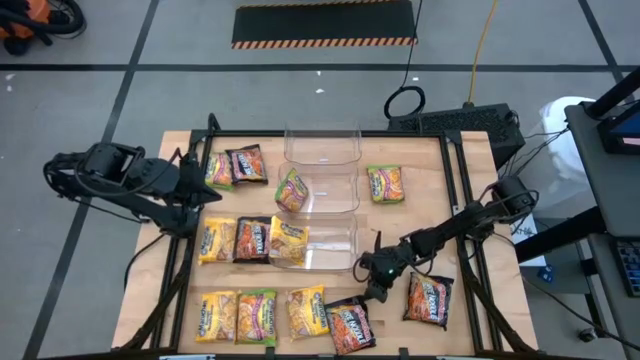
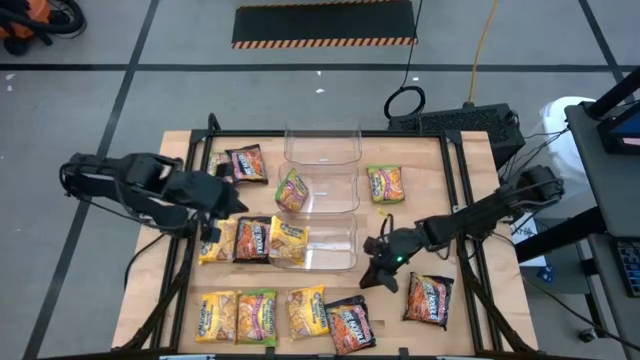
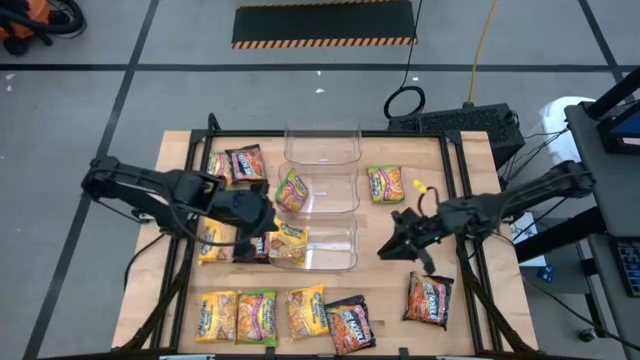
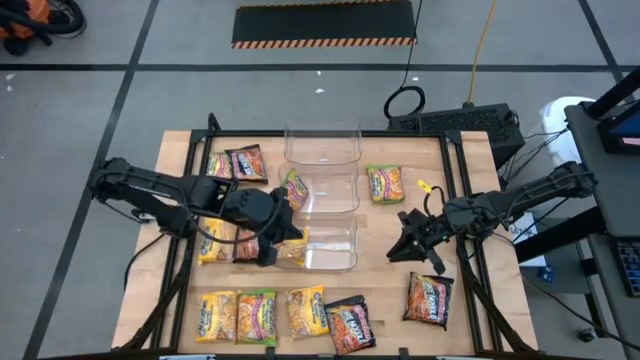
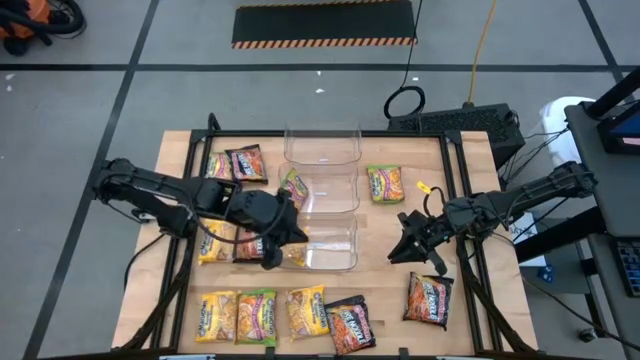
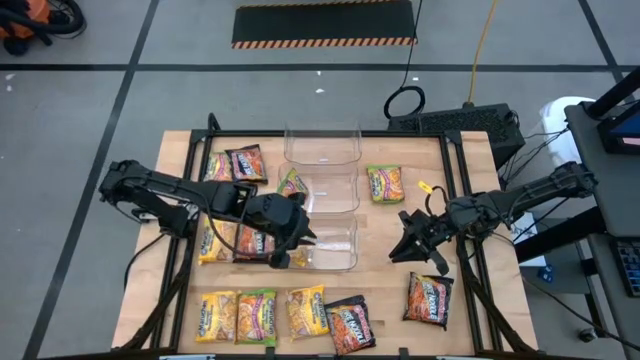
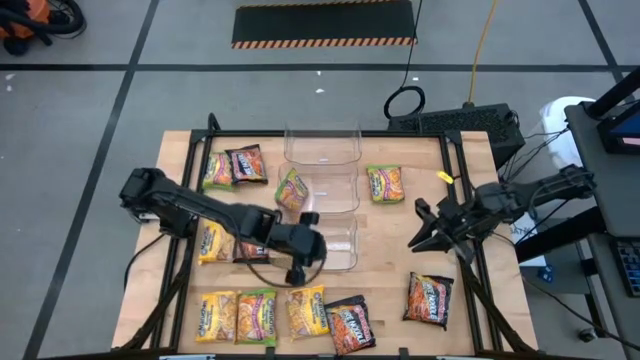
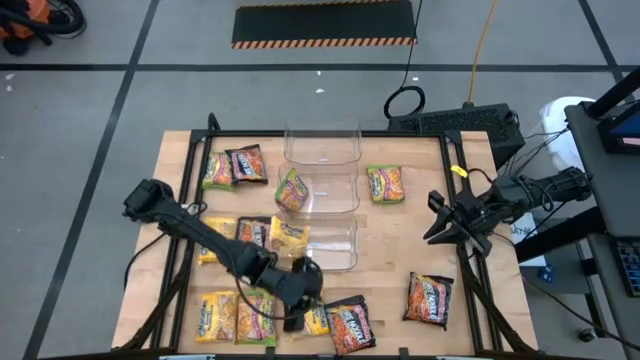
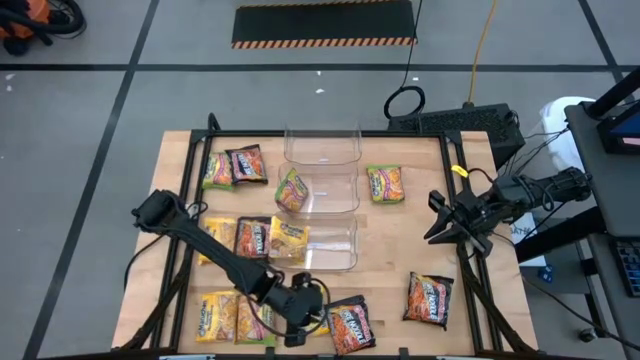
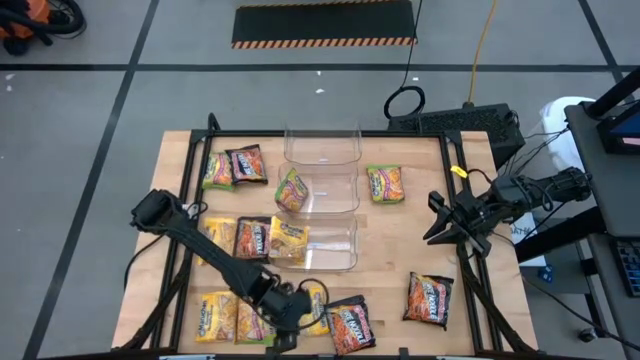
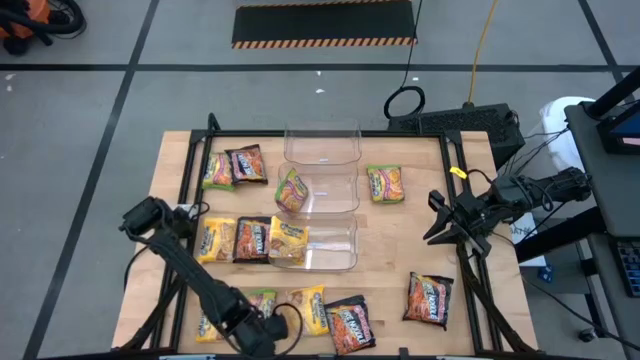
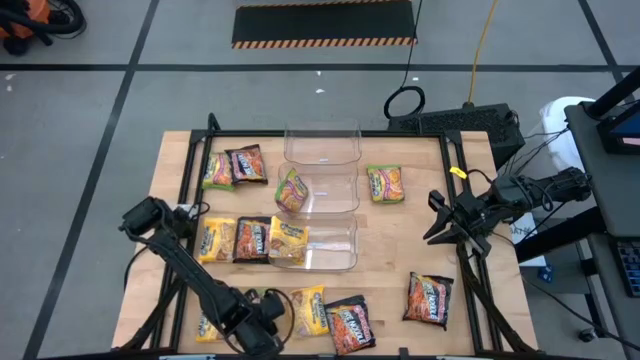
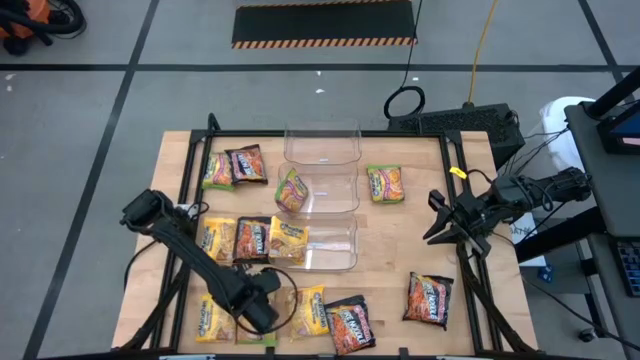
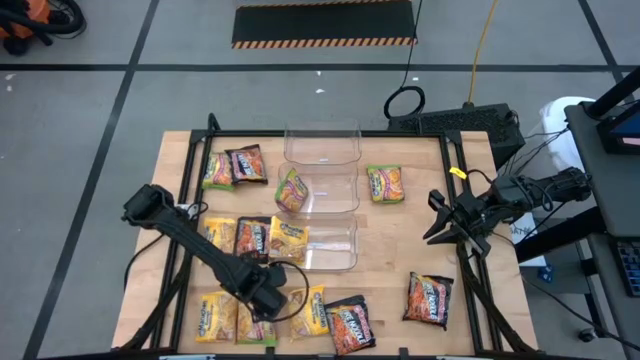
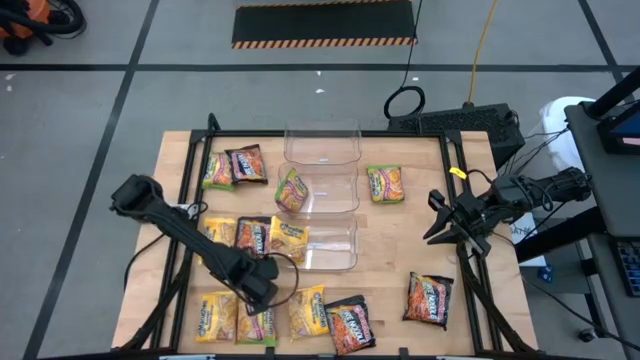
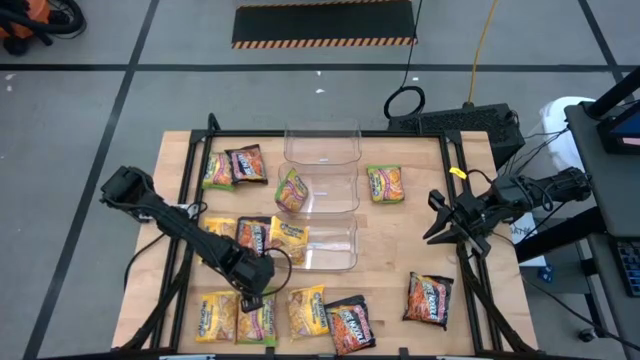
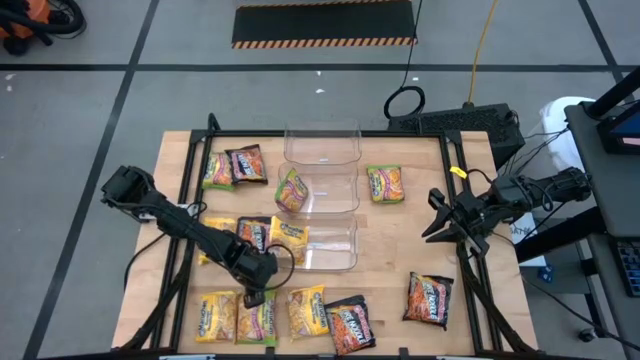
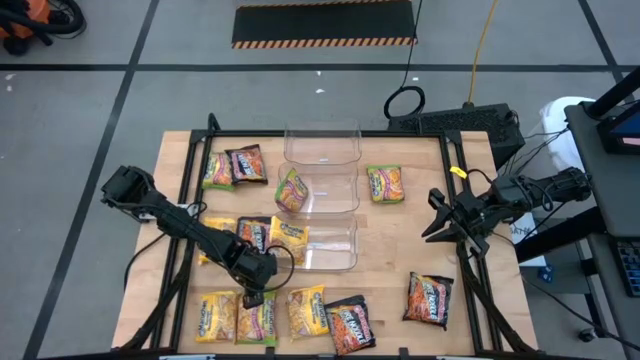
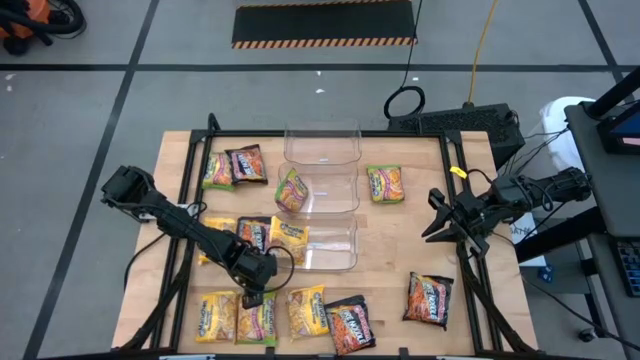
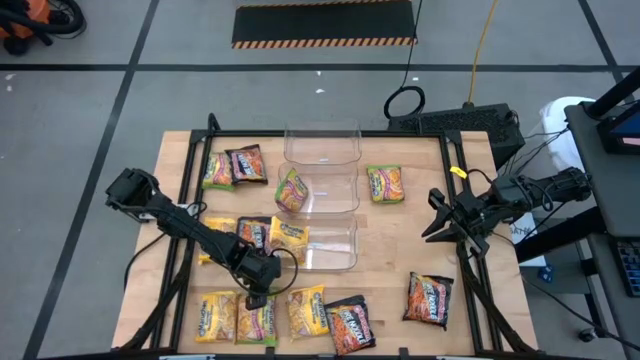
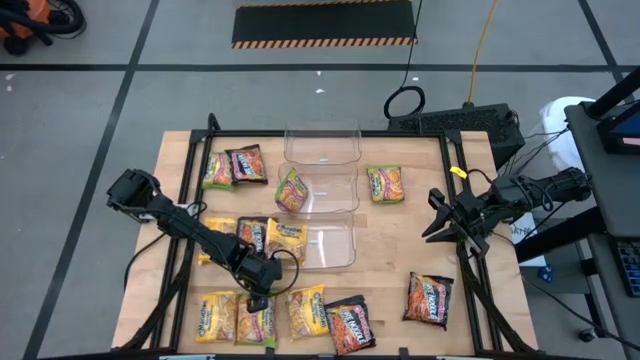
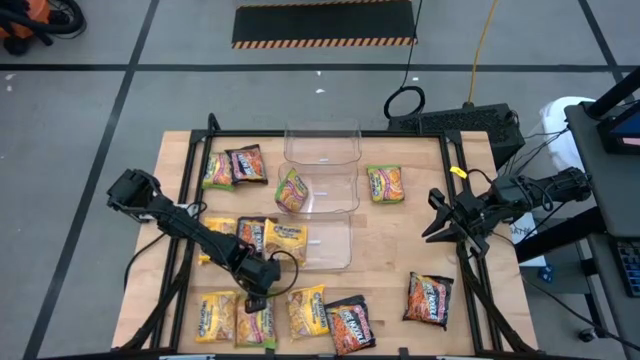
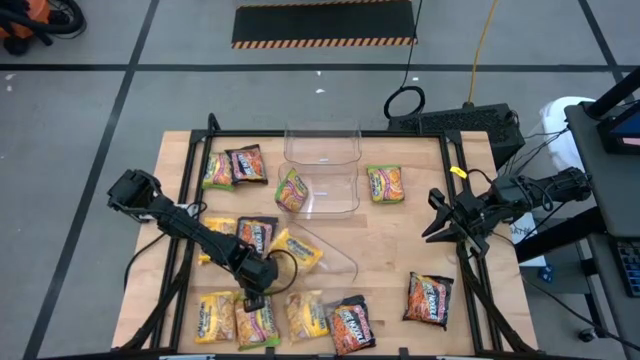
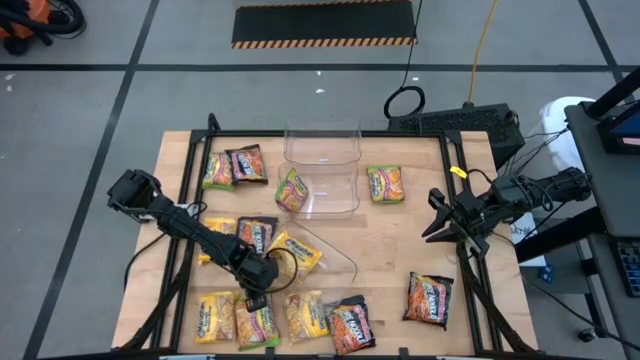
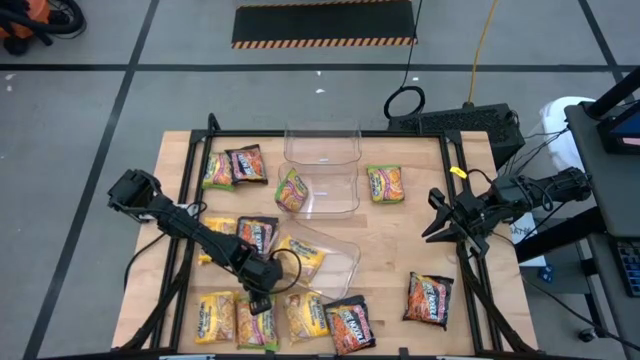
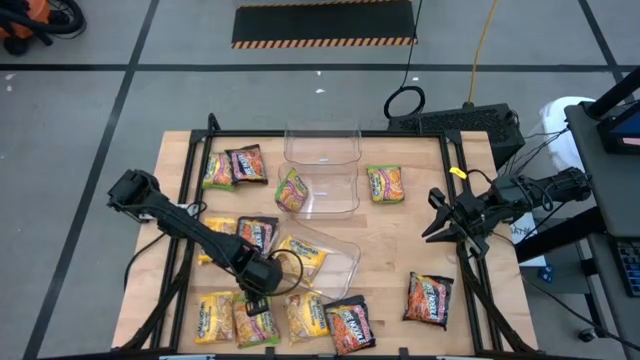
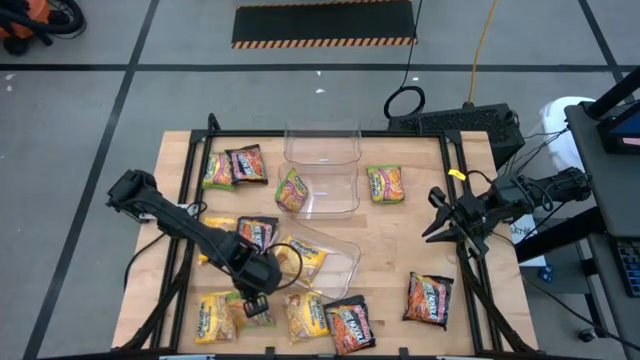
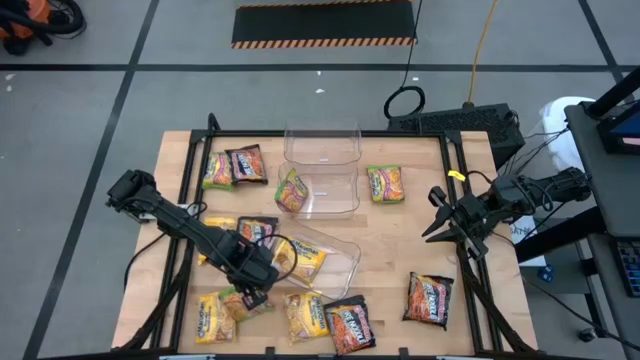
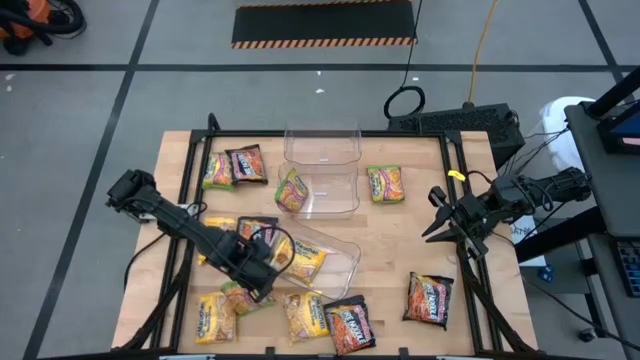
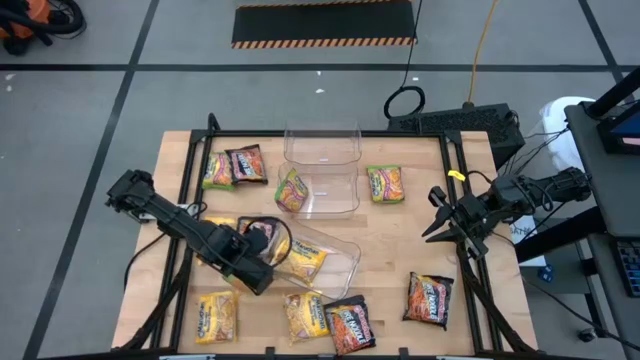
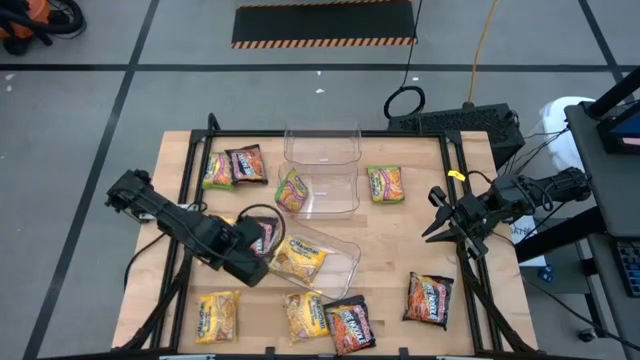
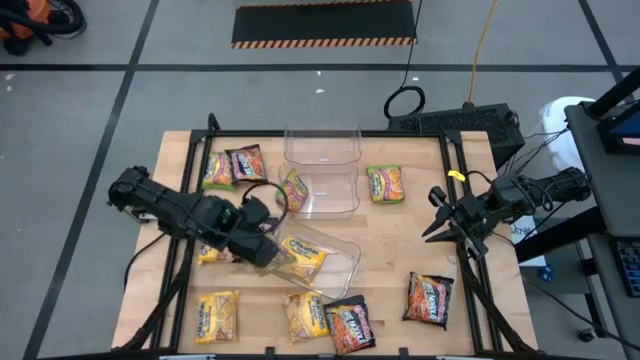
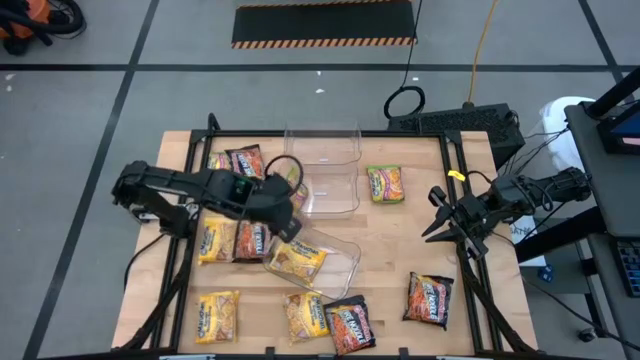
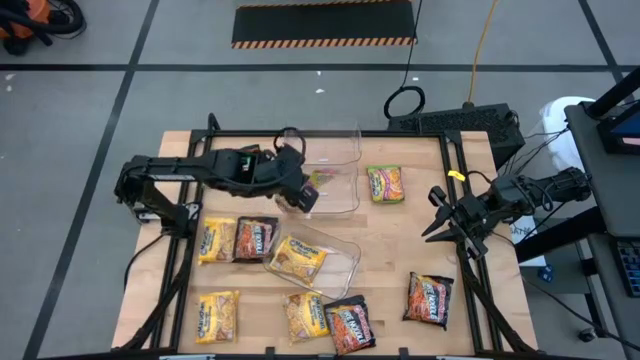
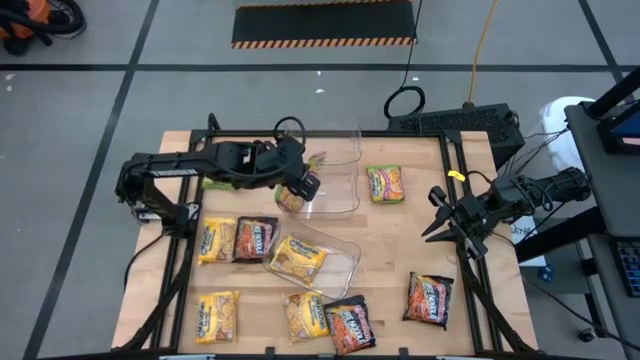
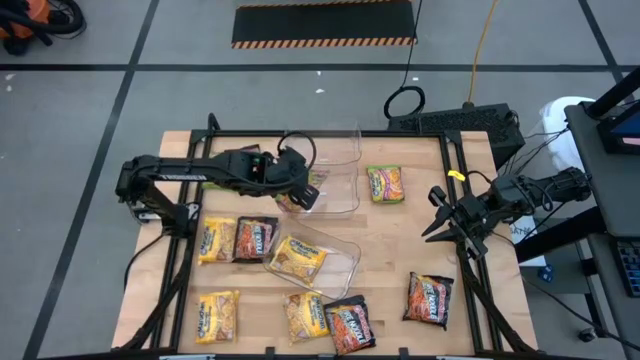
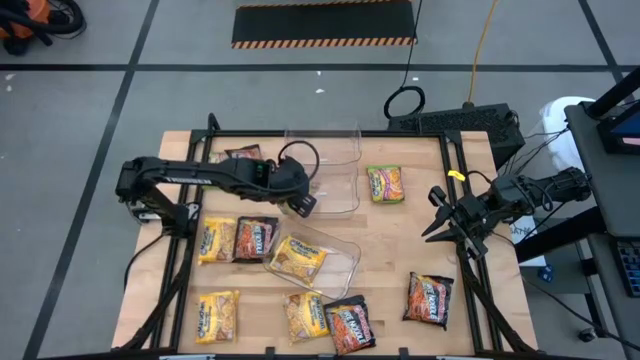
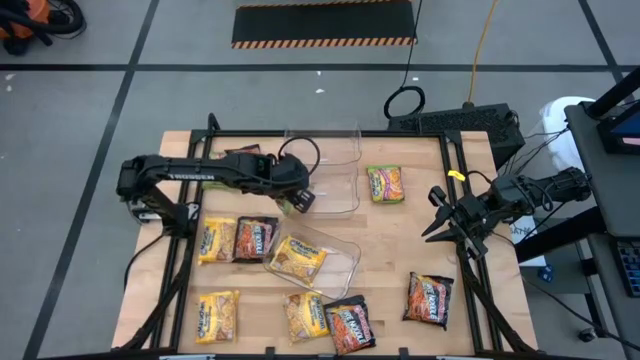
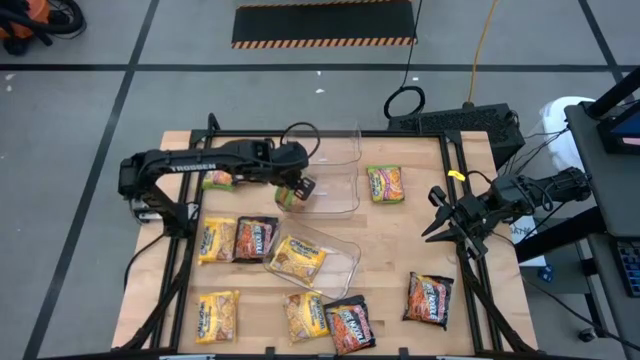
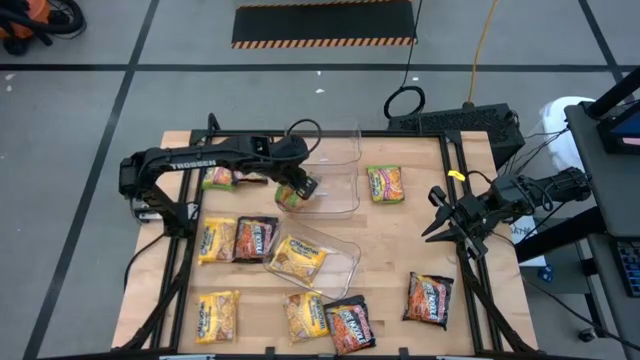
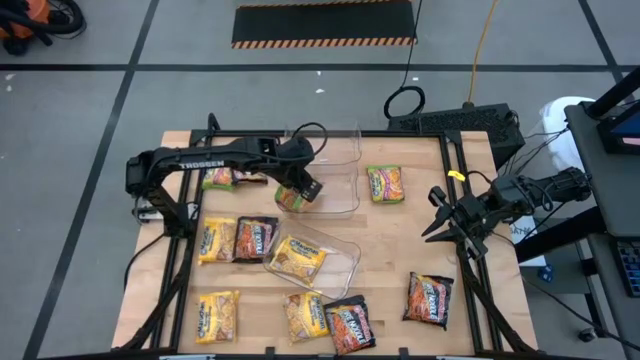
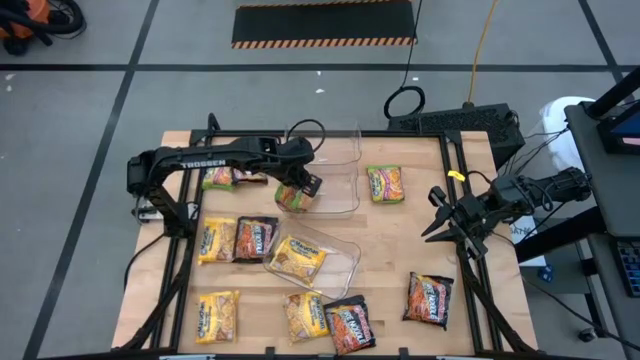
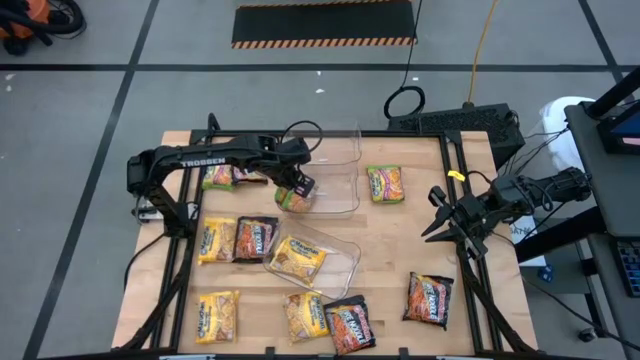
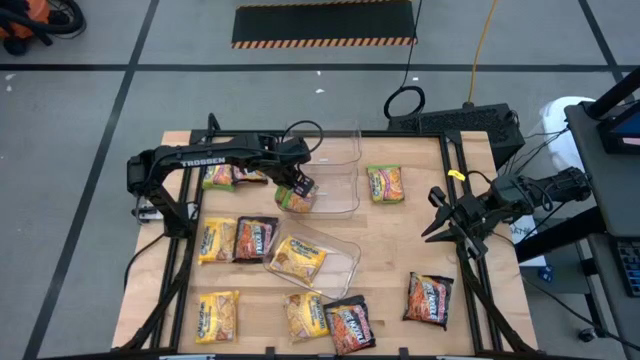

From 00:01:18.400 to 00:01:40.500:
Task: Sort Maruchan noodles
Put the green noodle pack into the center transparent bin
